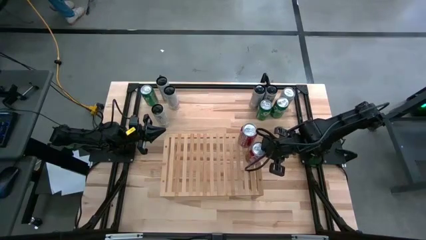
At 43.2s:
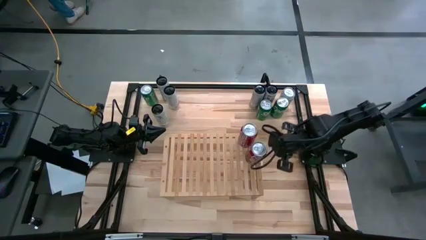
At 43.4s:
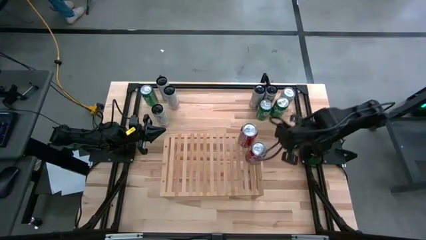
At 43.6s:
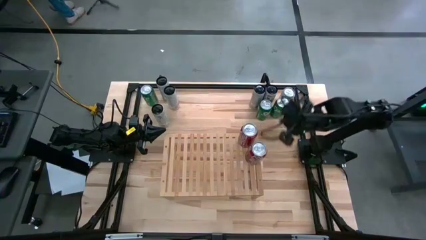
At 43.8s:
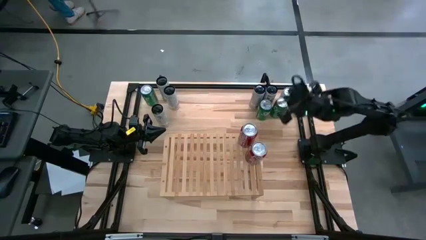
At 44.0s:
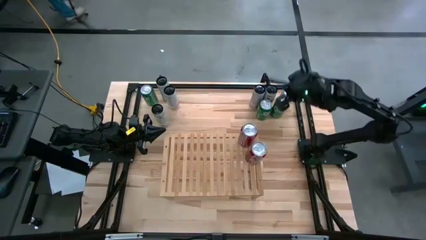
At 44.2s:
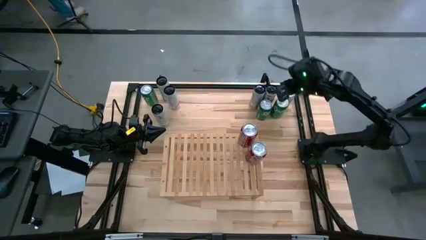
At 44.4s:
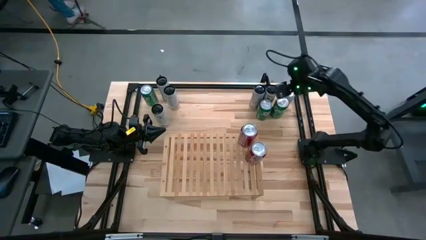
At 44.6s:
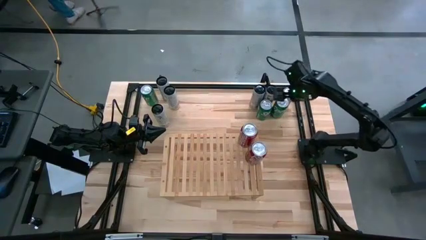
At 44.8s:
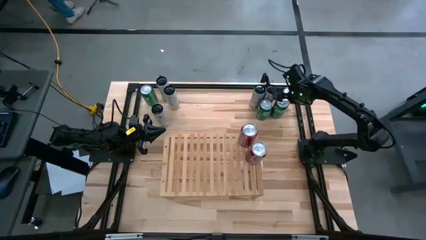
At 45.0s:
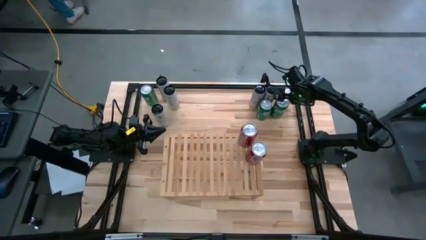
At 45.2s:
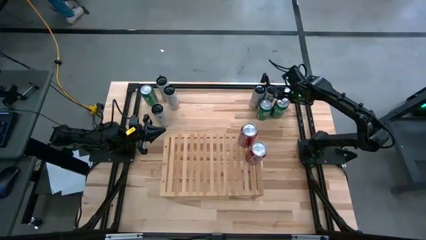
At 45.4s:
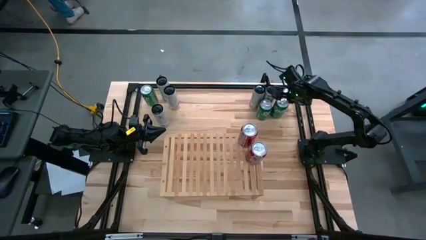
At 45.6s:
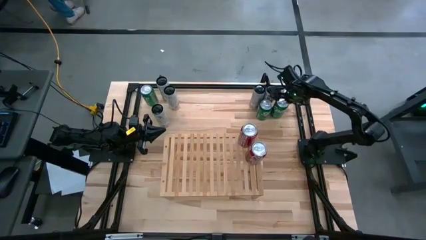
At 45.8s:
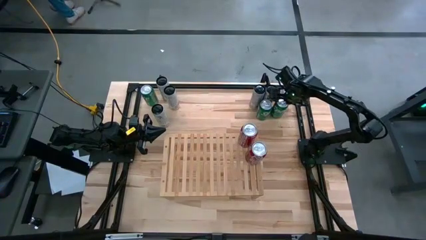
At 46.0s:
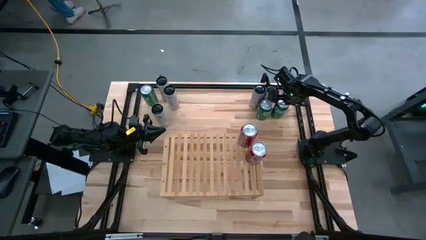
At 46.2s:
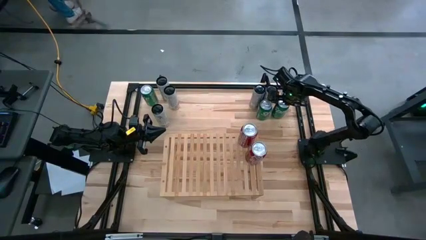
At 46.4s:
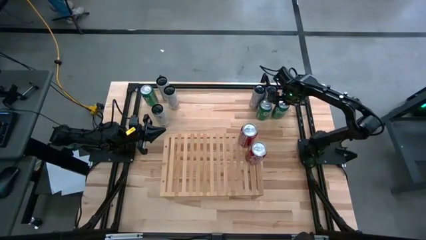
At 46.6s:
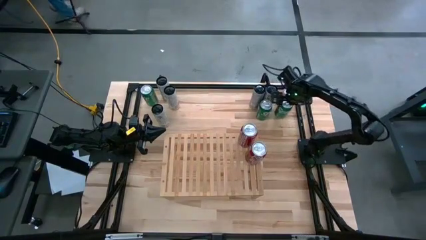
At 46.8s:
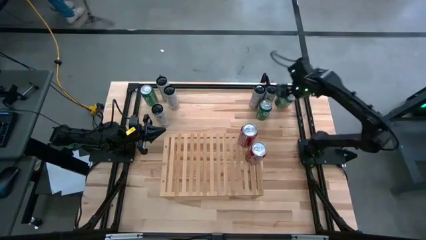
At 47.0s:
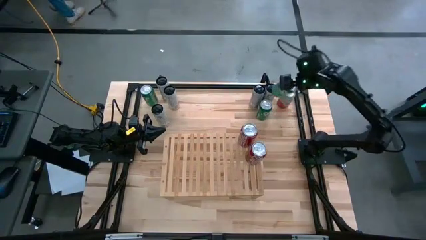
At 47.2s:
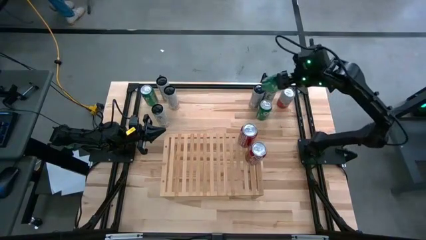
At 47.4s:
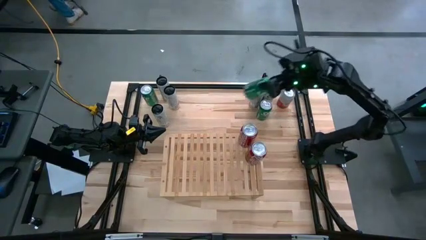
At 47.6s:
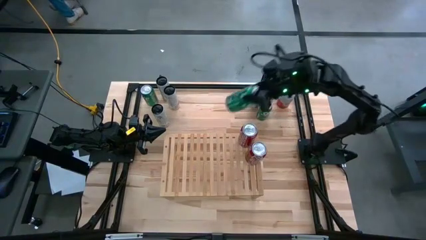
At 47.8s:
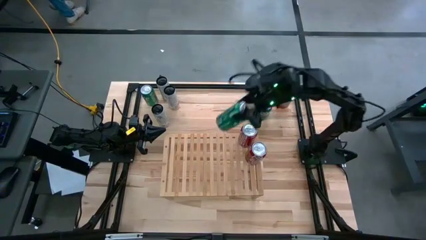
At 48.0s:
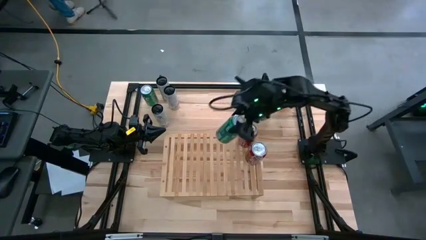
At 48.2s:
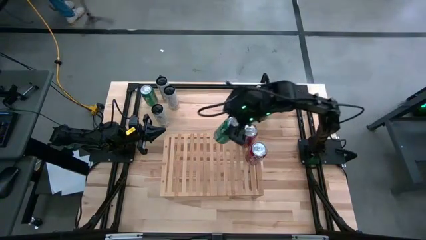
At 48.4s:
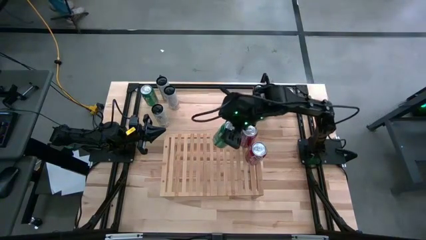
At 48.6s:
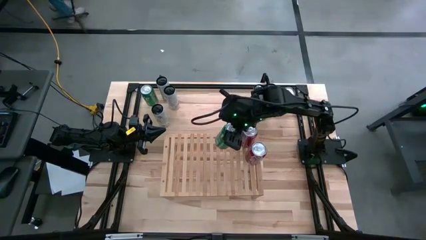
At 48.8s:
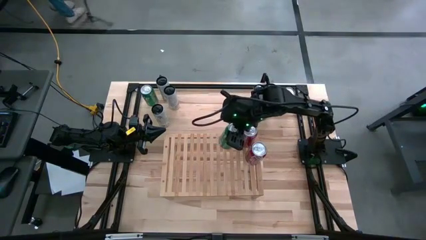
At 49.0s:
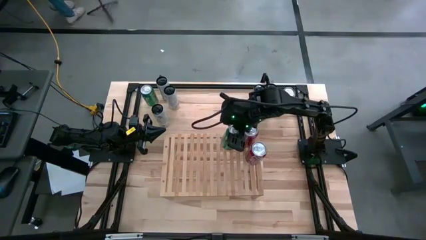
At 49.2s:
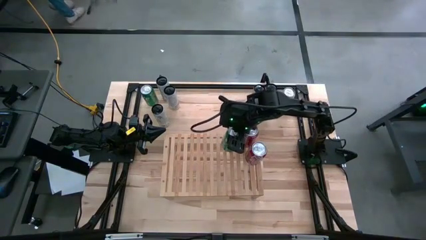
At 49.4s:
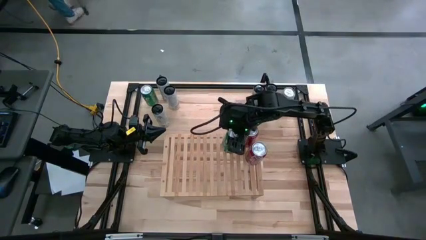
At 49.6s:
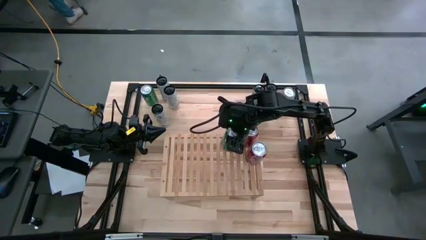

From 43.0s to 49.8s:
Task: Place canned beverage on shelf
Put the top right green soda can on the shelf

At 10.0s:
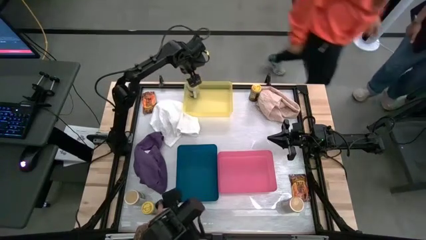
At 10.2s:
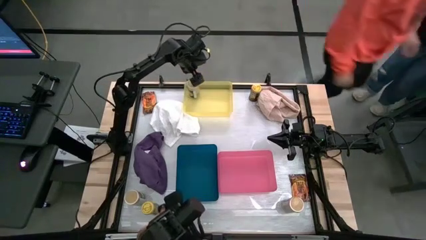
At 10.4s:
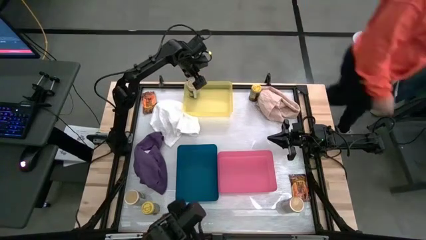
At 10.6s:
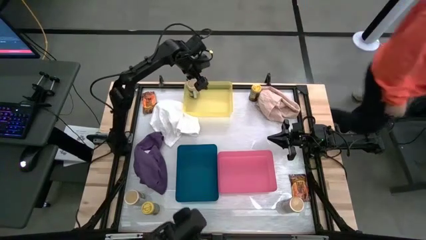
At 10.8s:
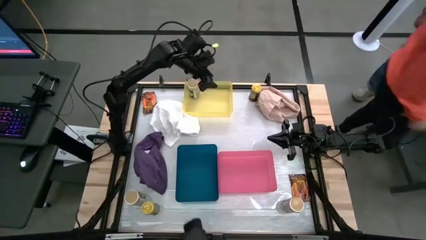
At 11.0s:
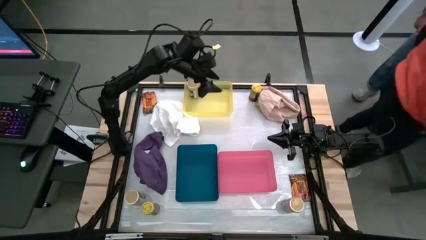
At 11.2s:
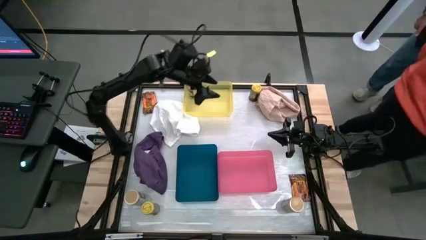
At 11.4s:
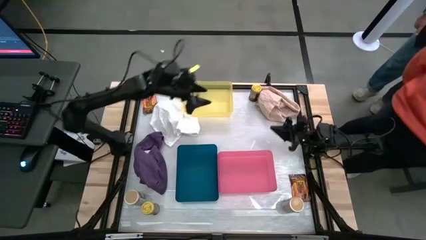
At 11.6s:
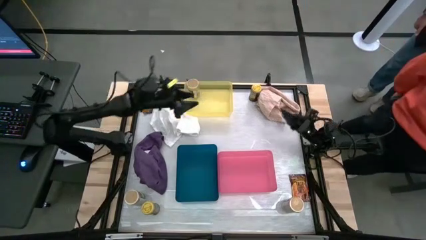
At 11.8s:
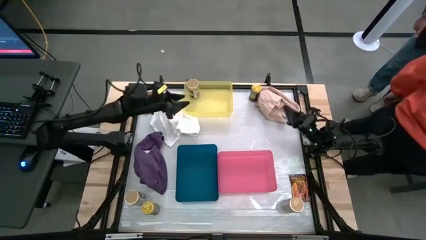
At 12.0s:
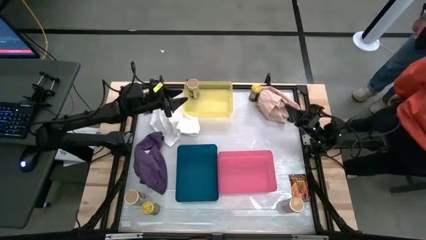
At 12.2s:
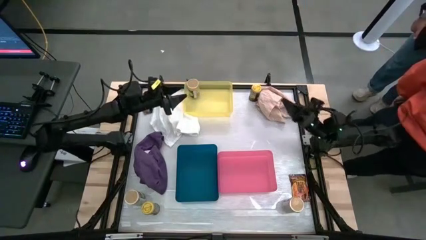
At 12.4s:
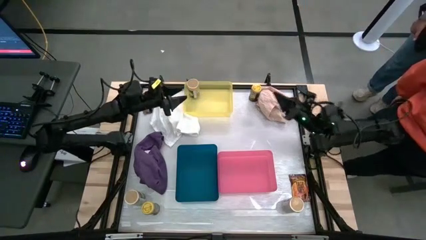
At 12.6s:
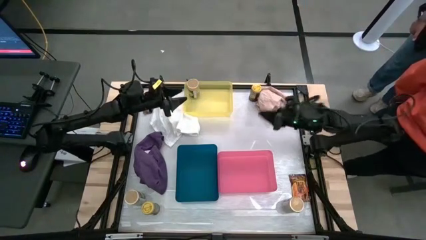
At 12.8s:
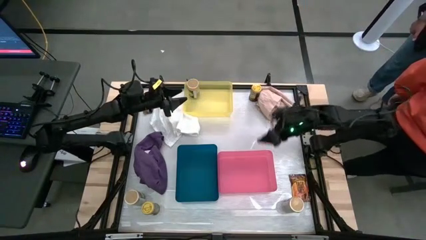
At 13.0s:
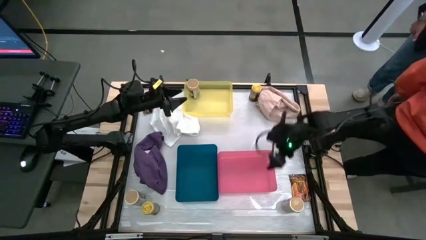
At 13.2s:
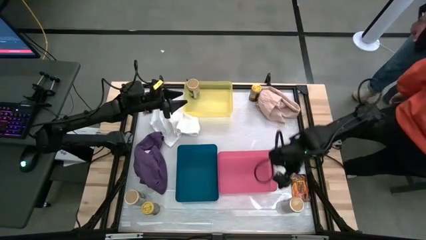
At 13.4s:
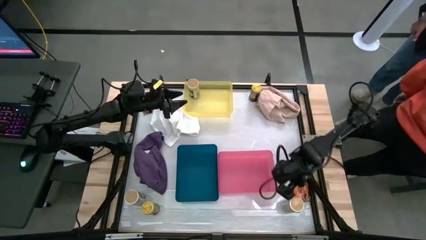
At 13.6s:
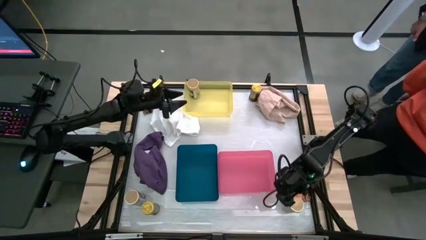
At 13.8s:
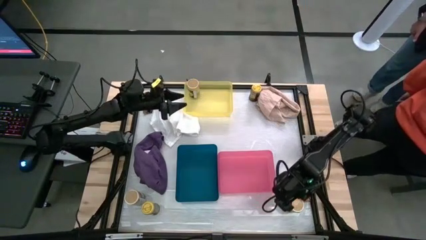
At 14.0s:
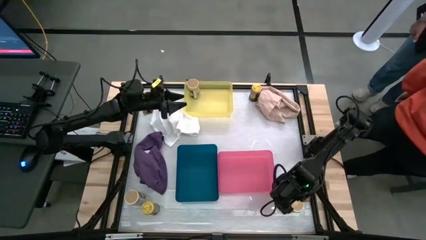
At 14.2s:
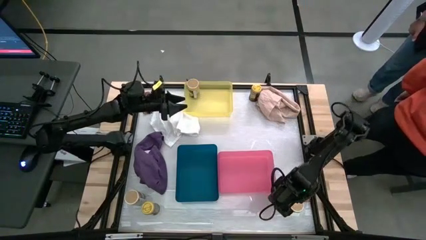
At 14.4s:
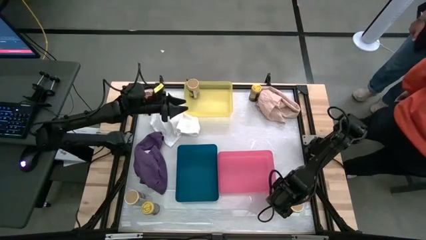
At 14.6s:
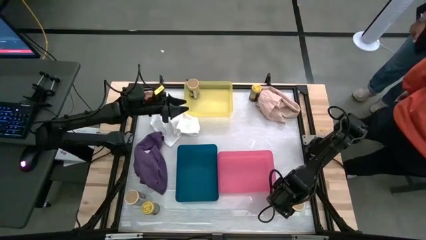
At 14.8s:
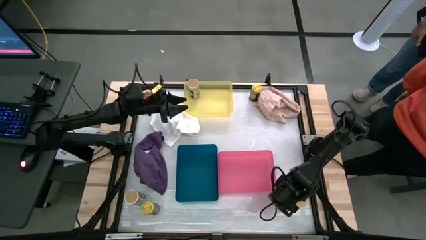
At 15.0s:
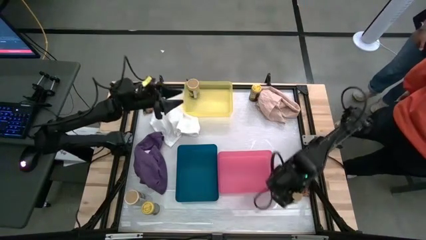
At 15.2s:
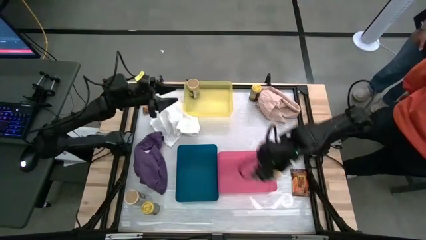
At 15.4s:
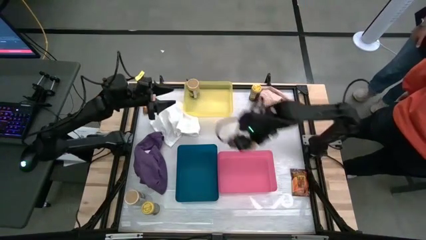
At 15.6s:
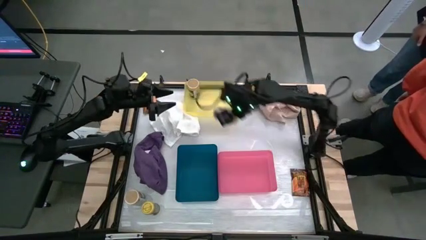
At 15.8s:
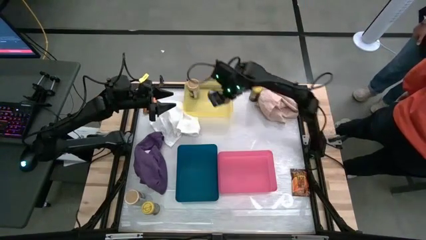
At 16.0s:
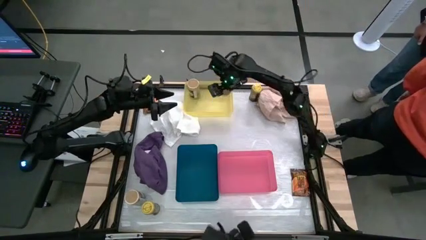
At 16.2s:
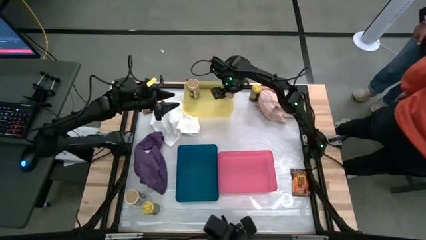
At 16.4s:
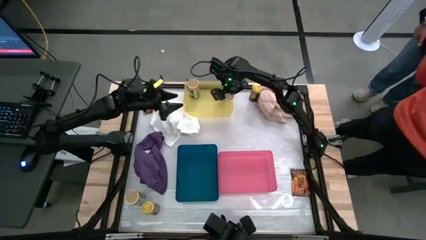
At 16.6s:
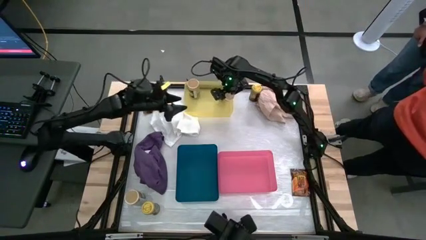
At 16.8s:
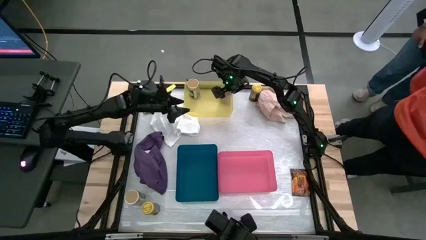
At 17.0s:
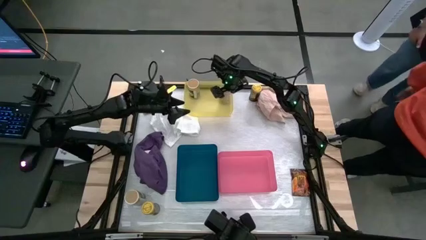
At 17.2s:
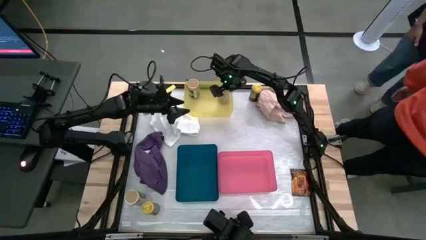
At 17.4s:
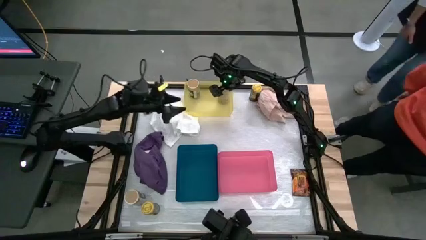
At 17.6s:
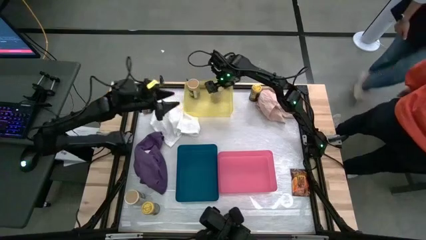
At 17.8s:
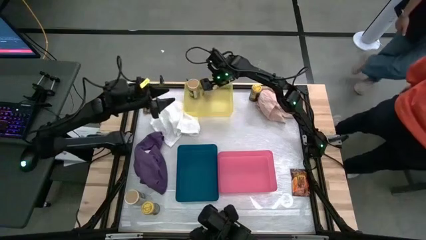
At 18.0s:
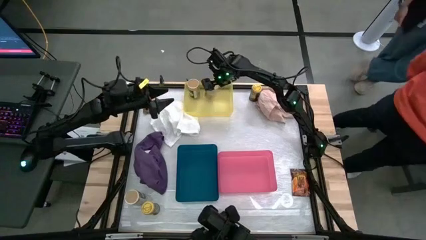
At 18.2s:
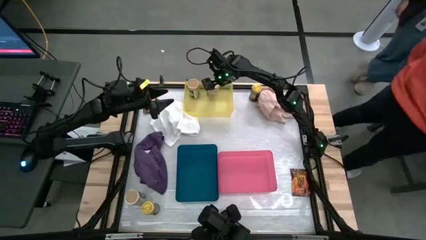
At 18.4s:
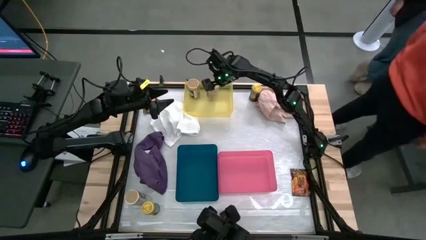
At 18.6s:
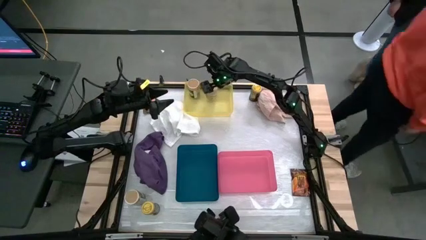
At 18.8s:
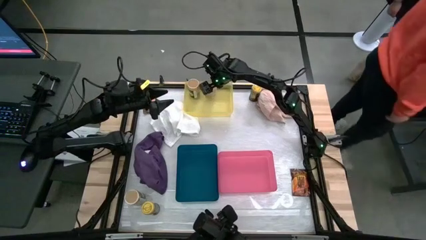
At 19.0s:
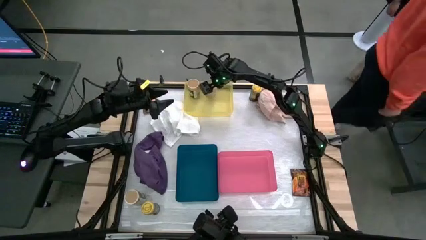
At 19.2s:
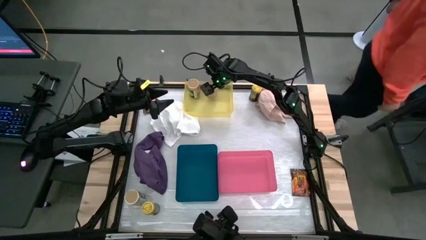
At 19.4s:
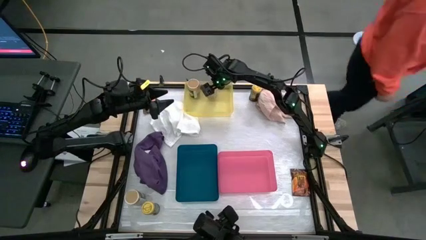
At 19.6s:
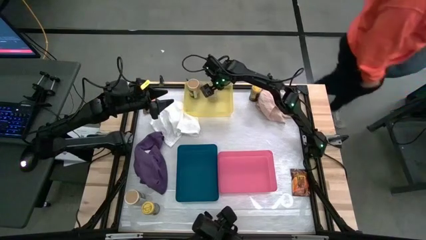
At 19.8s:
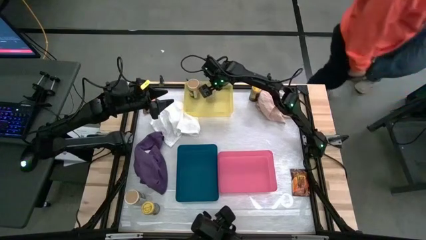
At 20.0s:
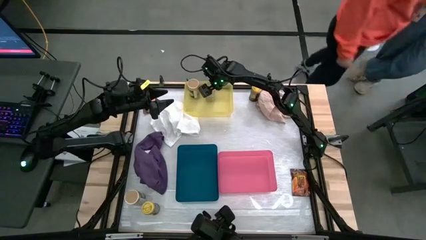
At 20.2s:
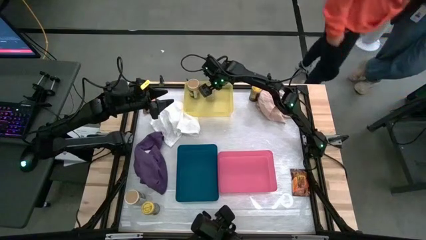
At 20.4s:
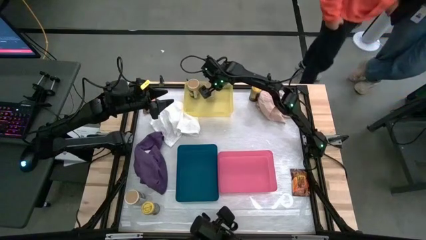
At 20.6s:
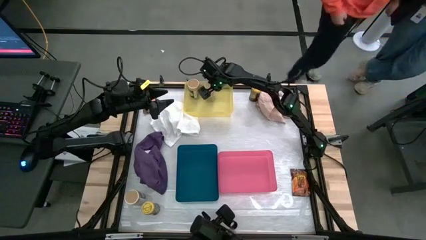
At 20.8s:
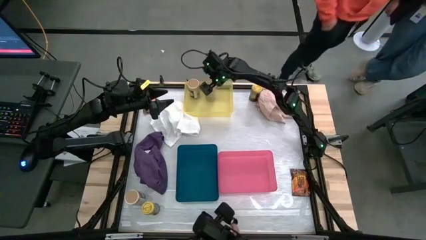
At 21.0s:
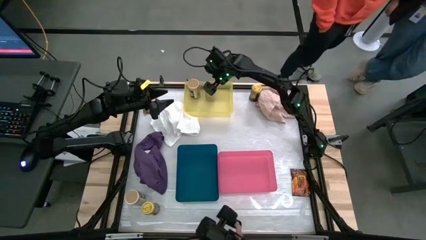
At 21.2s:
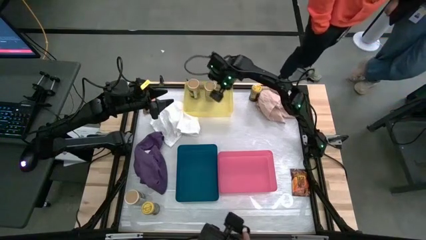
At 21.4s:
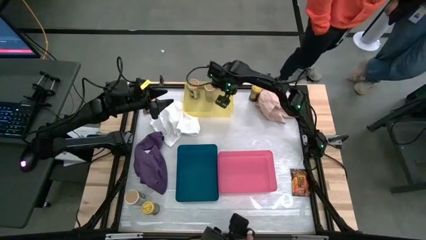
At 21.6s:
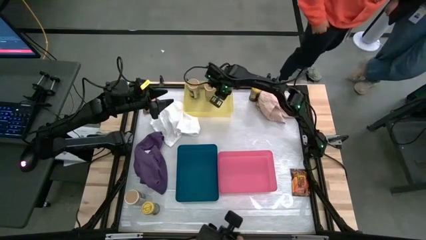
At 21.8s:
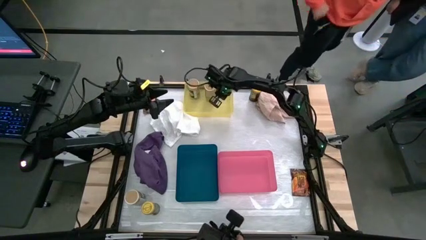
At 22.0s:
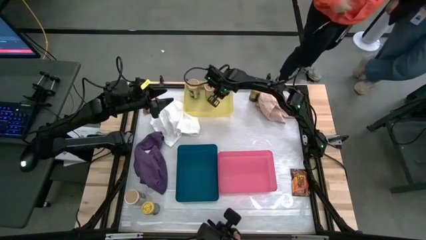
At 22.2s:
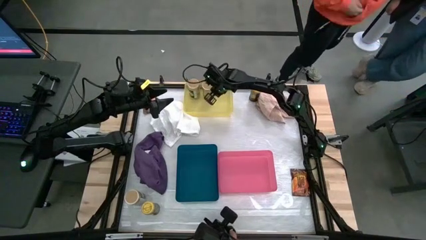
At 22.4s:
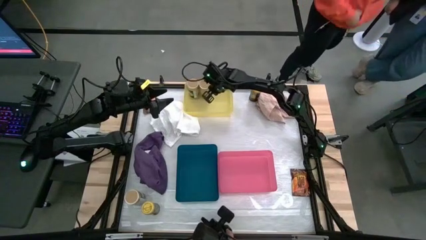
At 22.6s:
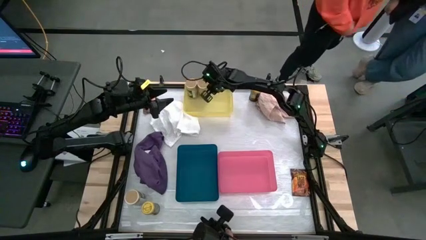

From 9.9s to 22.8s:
Task: Sort spices by type
Put the right golden seasoning bottle into the yellow bin aligned with the other golden seasoning bottle
